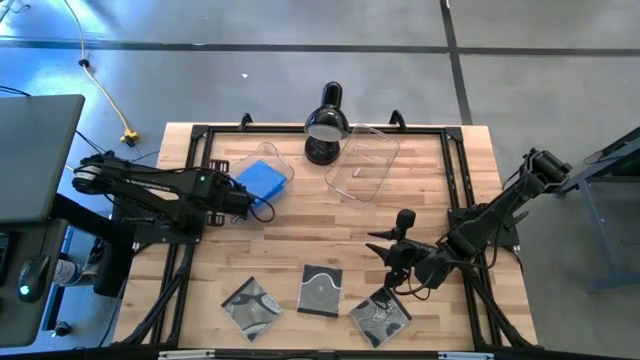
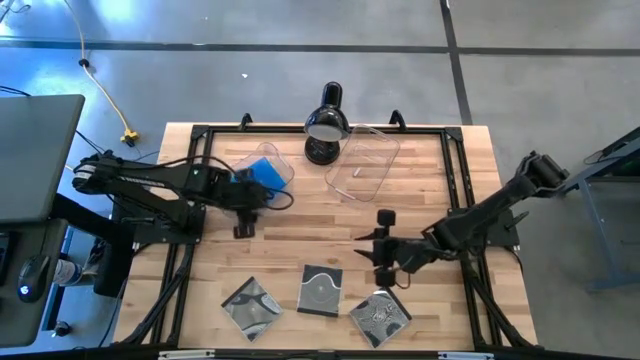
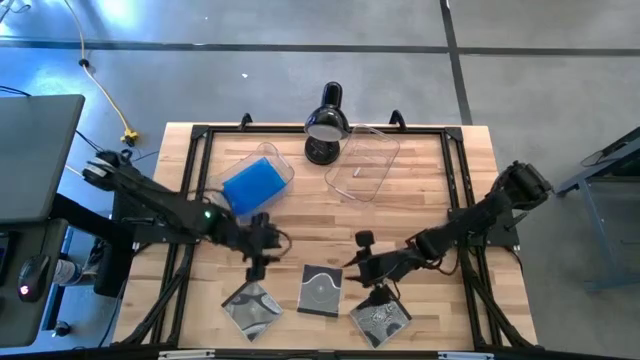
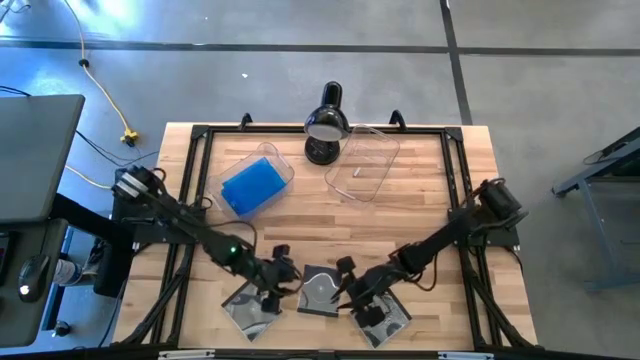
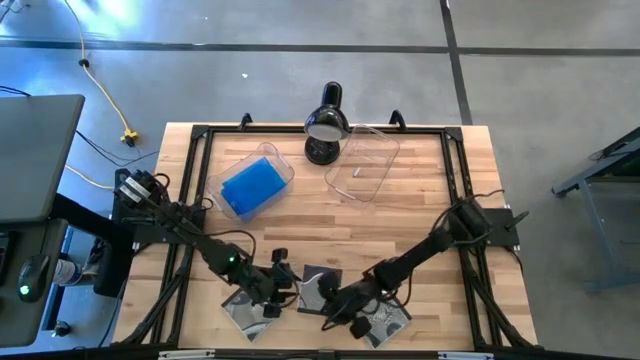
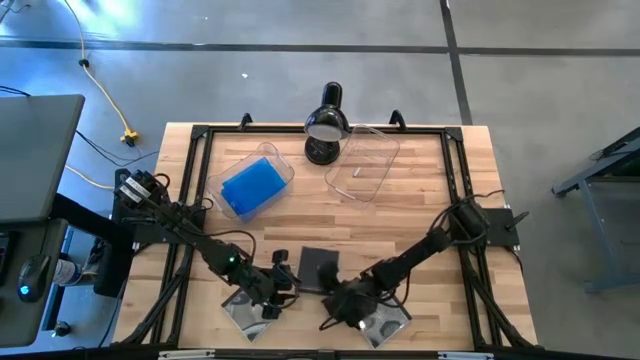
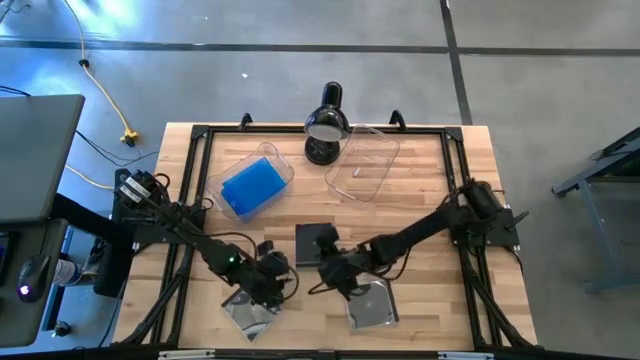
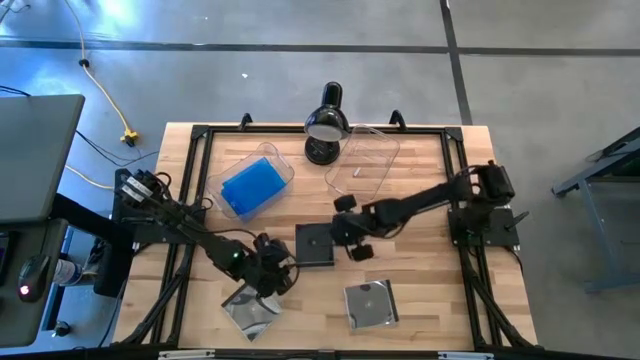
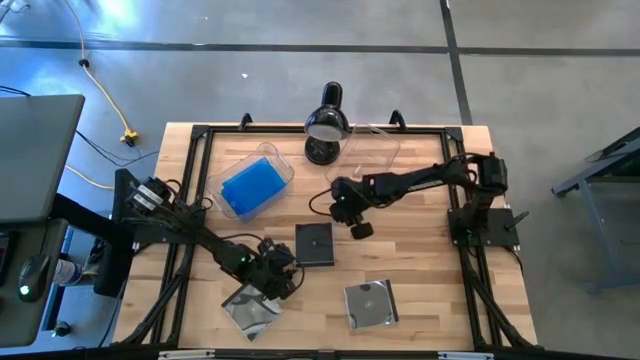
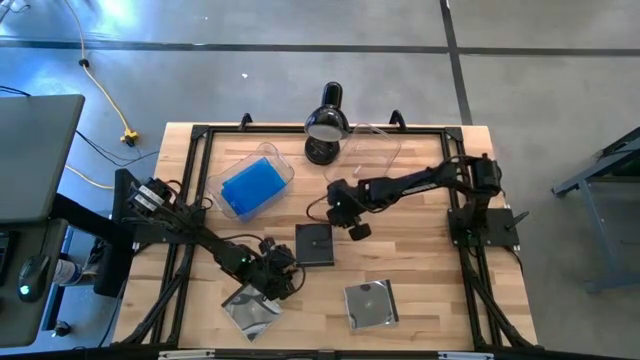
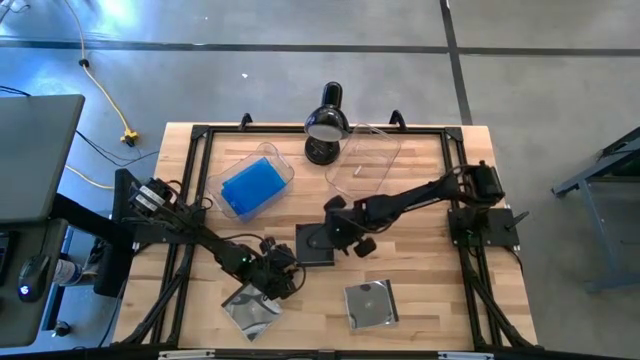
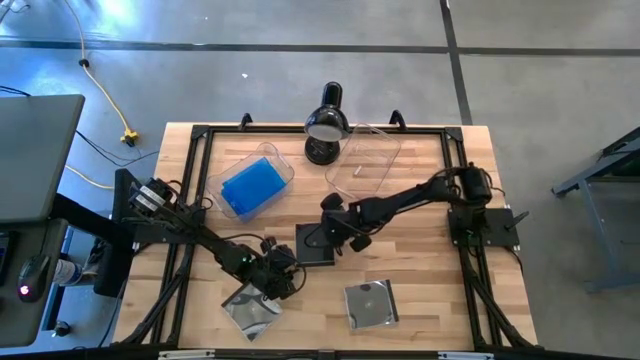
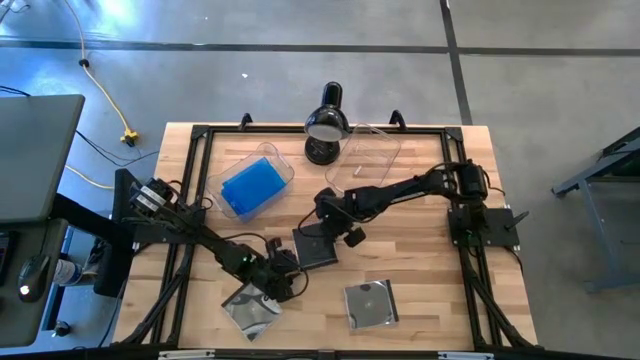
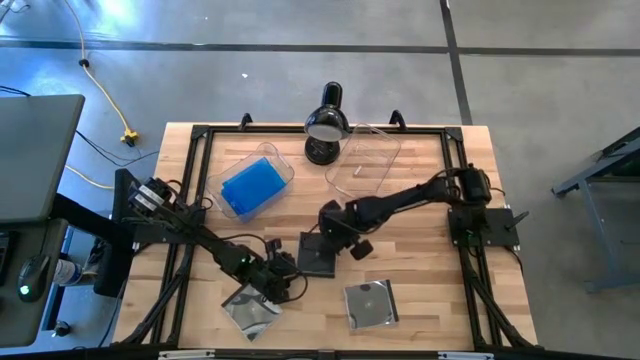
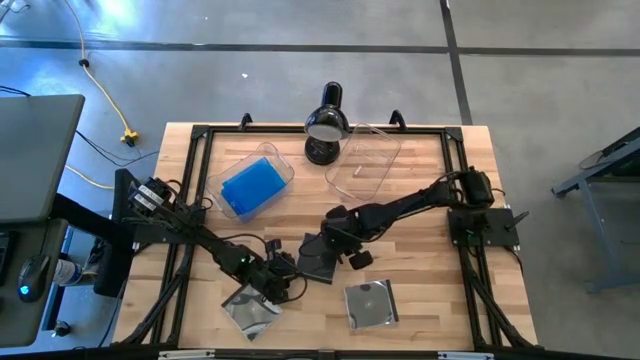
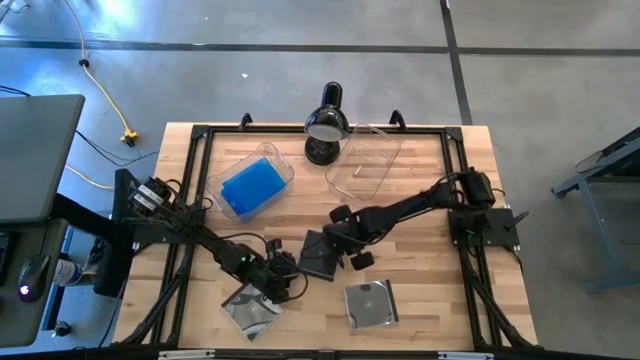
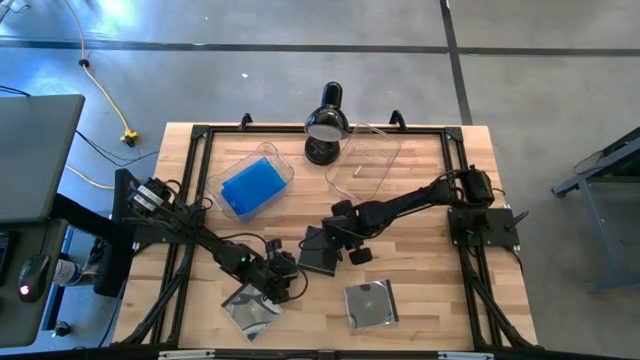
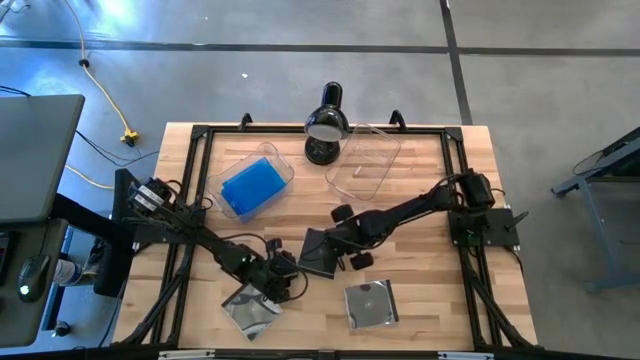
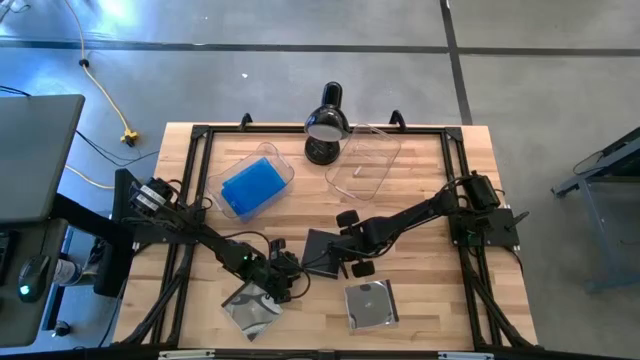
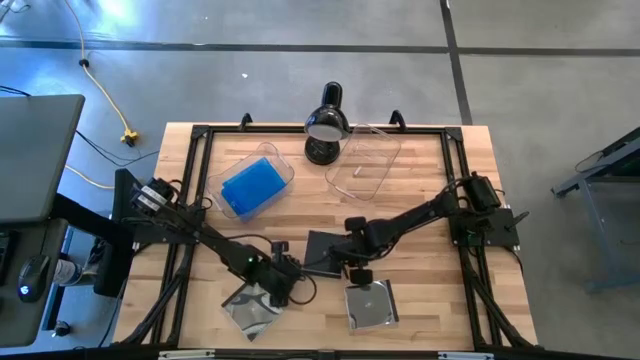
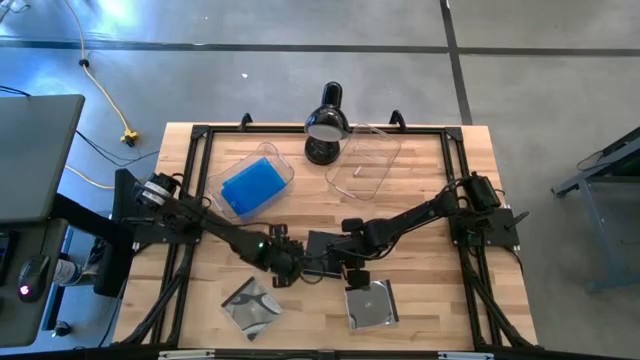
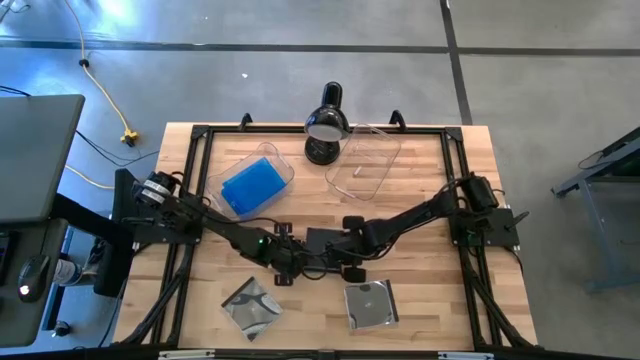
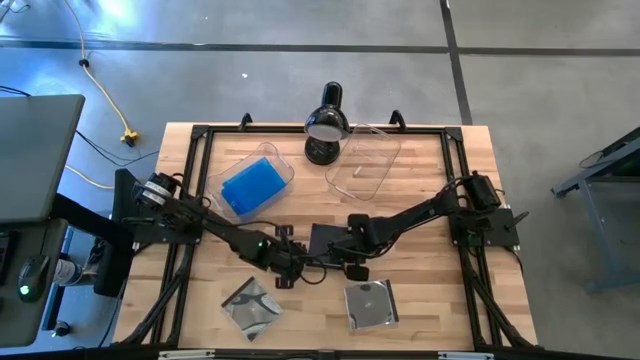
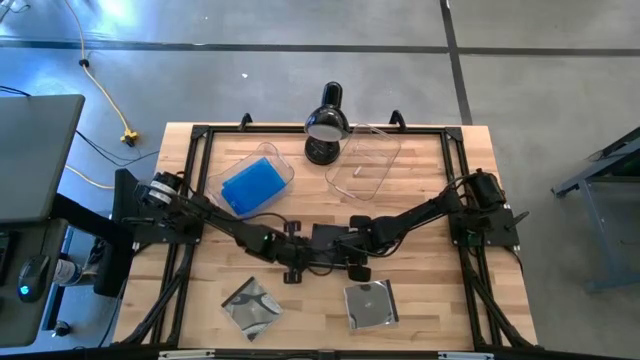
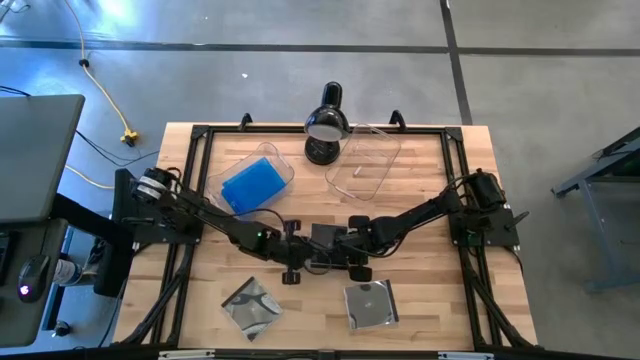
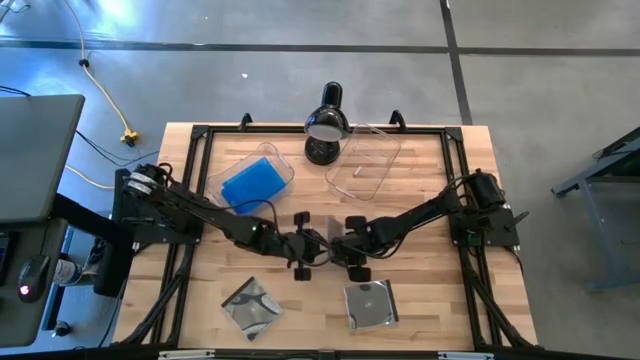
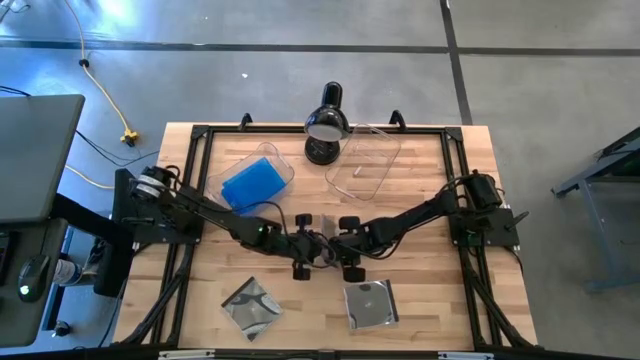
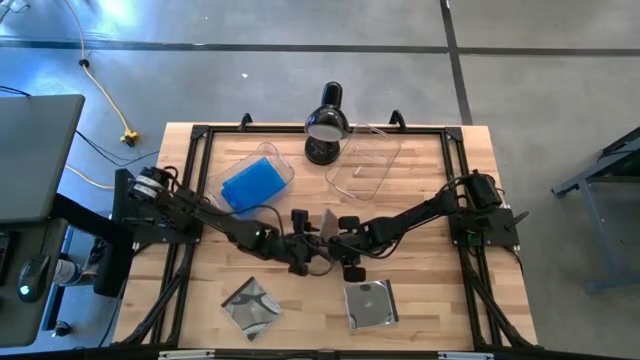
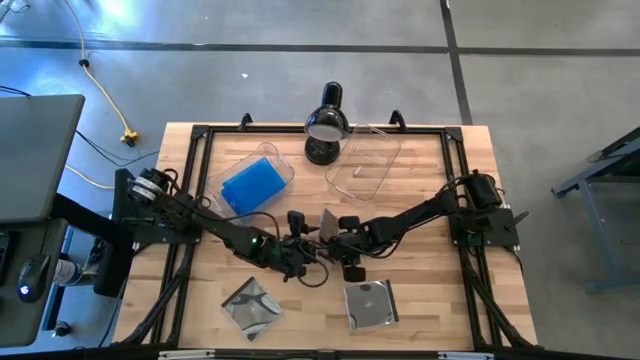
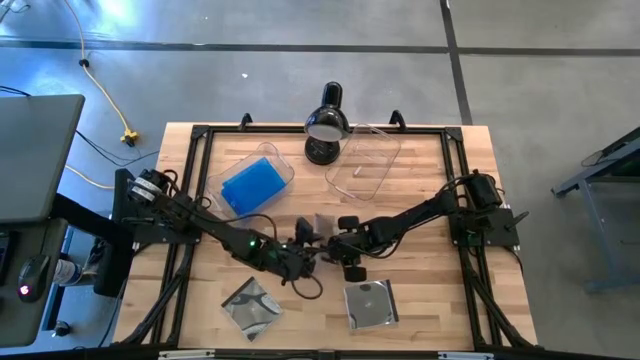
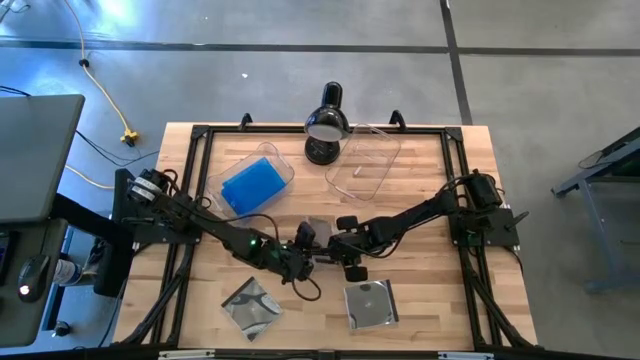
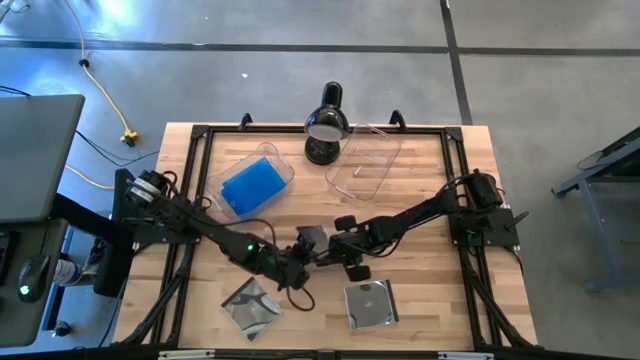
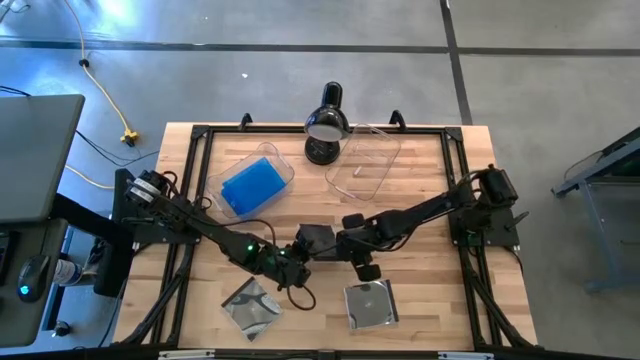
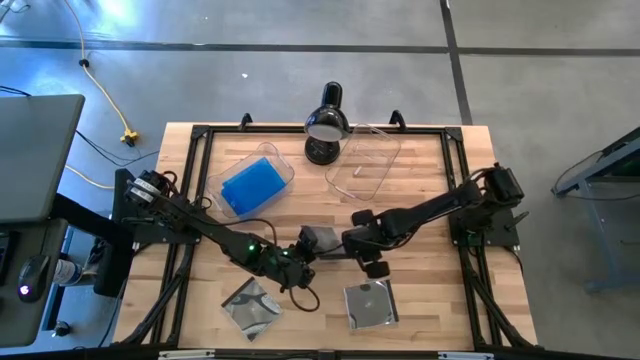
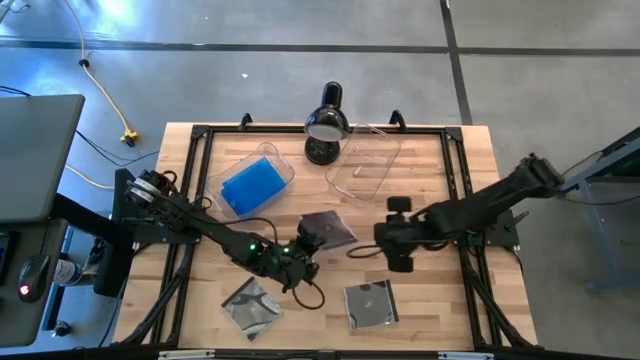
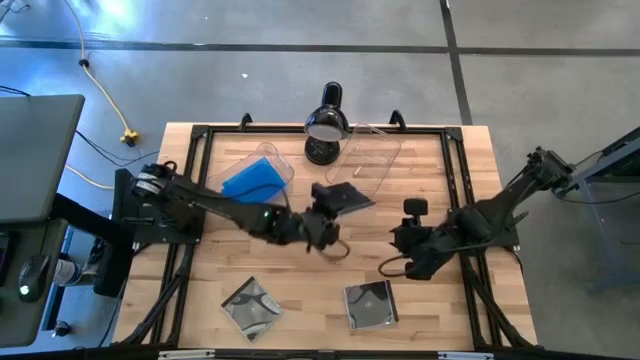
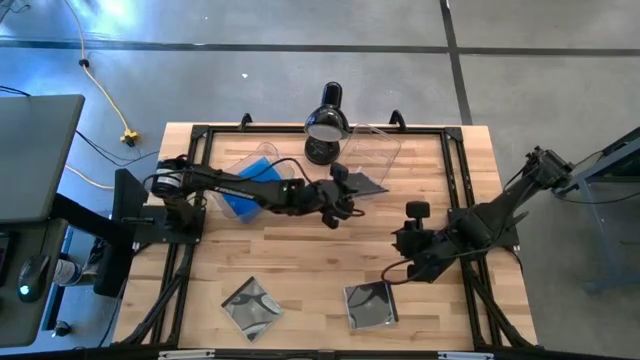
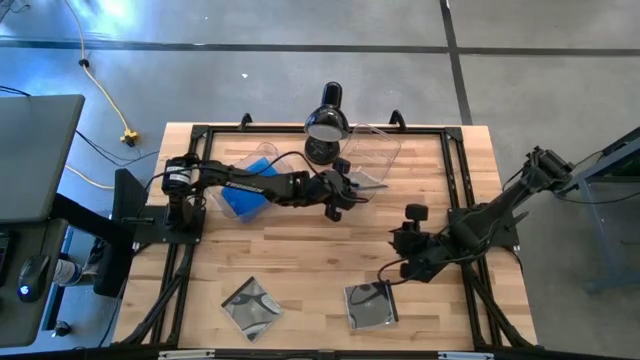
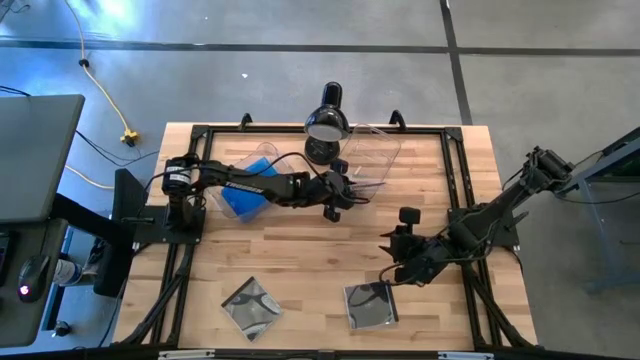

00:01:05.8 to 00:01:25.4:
Task: Pick & place jewel cases by type
Put the center black CD case into the right transparent bin

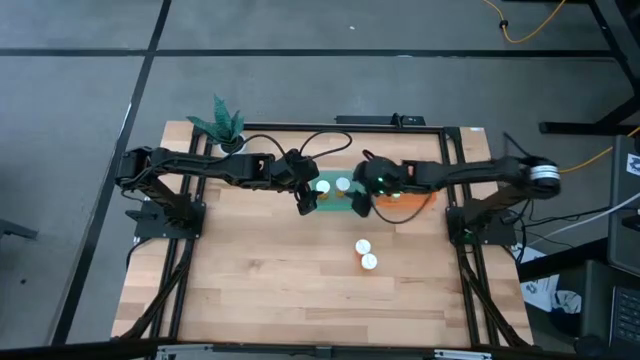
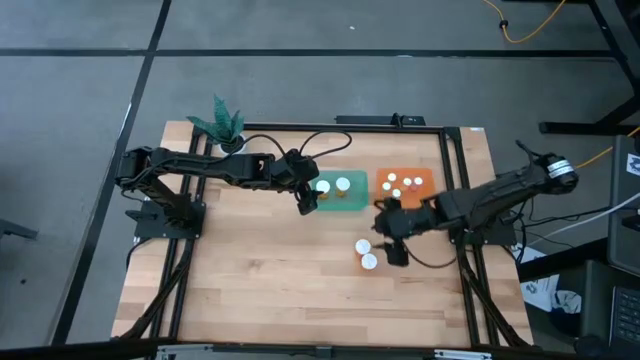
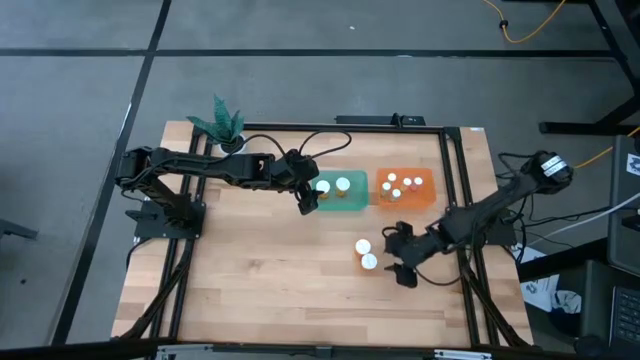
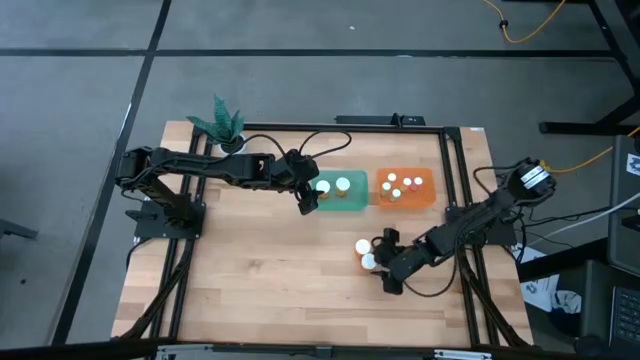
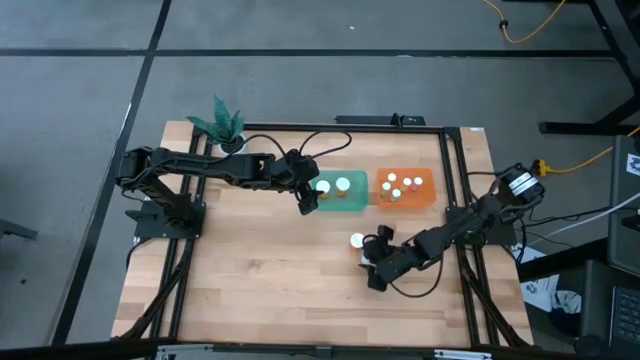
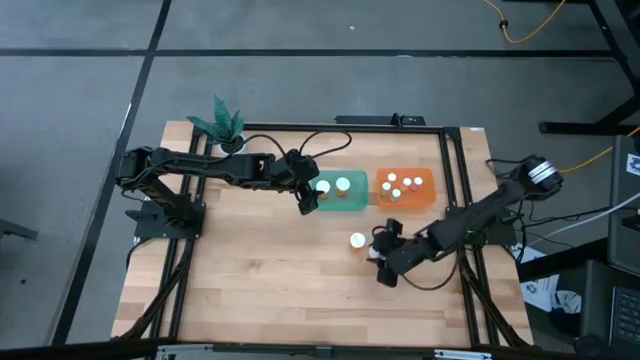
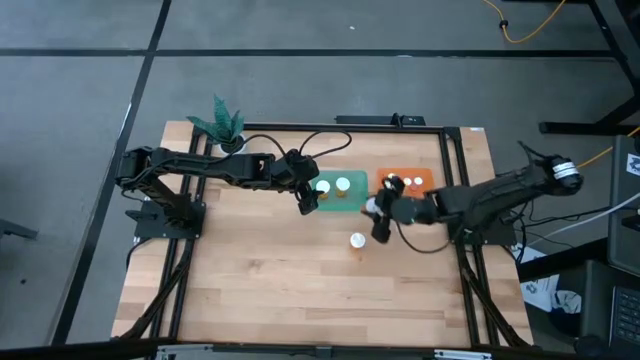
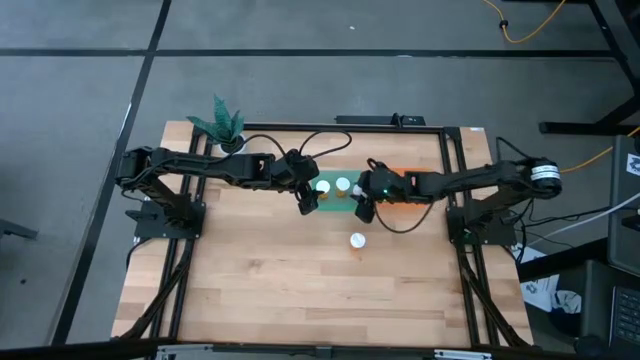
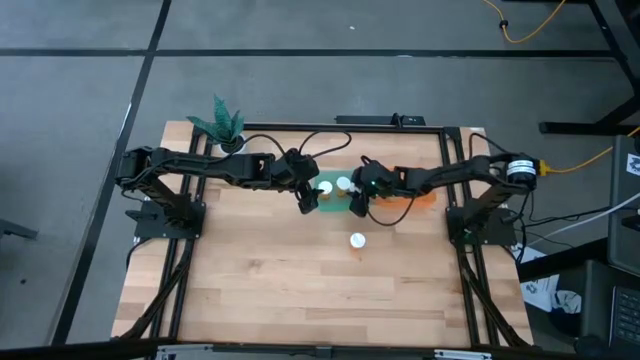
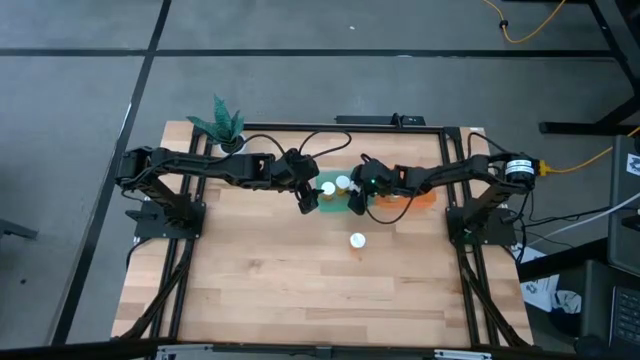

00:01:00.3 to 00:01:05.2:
Task: Pick and place medicine bottles into bin by pill shape (circle, oval)
Put the orange pill bottle into the green bin
